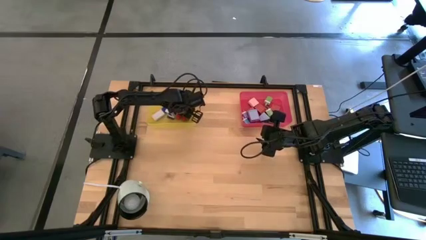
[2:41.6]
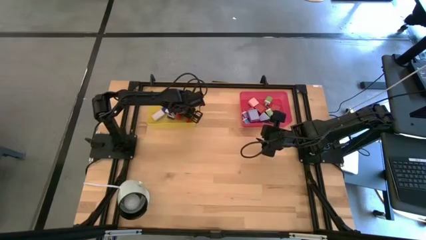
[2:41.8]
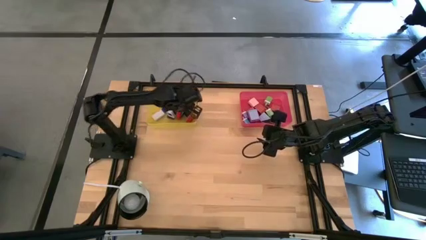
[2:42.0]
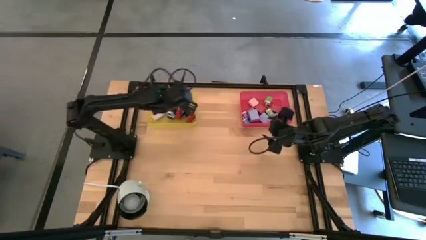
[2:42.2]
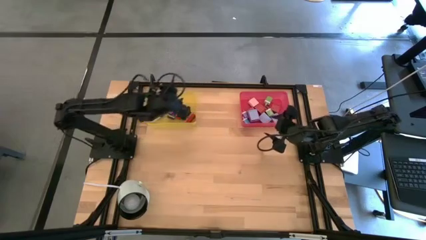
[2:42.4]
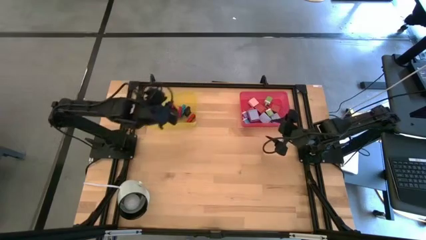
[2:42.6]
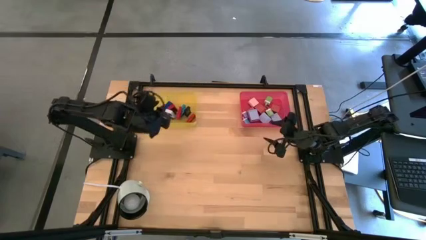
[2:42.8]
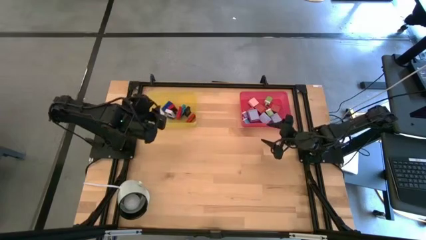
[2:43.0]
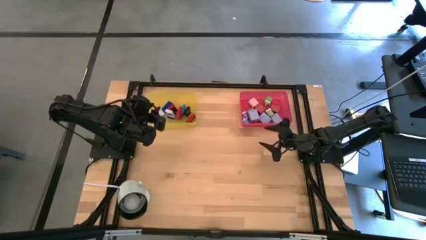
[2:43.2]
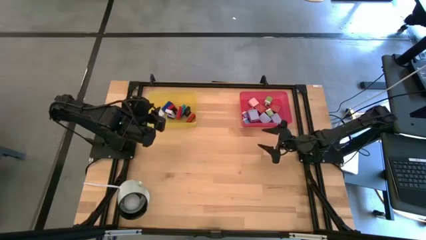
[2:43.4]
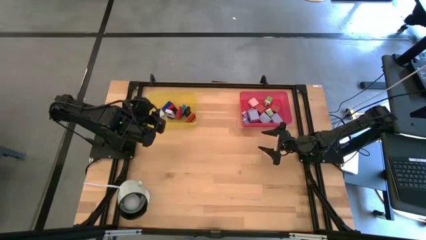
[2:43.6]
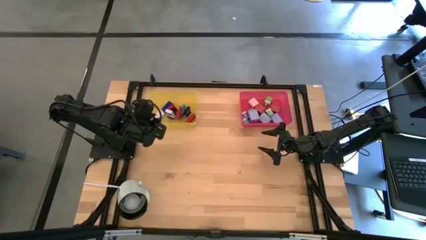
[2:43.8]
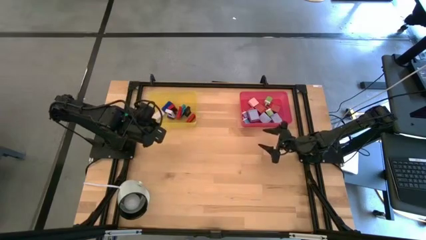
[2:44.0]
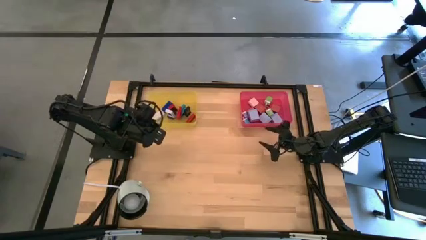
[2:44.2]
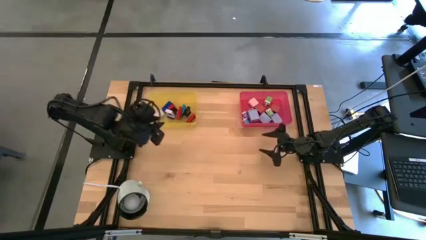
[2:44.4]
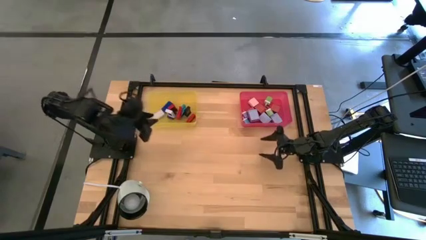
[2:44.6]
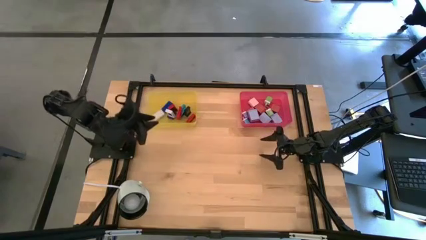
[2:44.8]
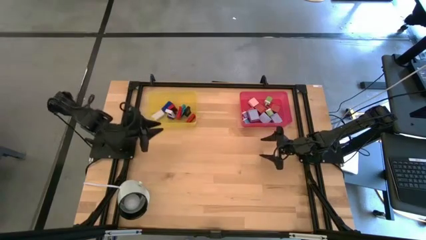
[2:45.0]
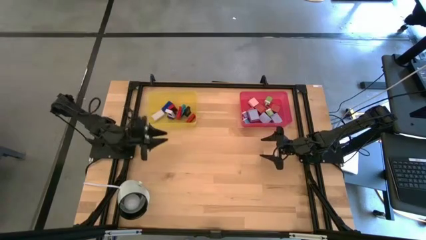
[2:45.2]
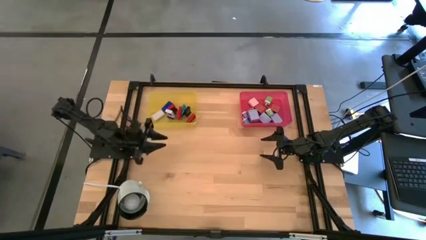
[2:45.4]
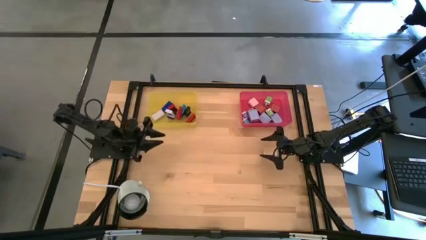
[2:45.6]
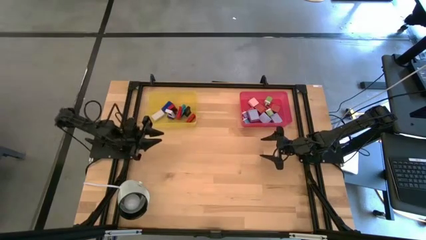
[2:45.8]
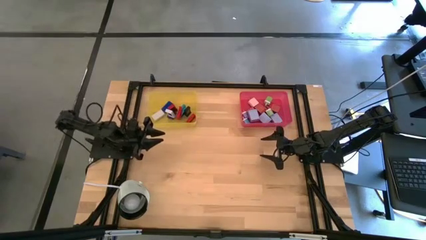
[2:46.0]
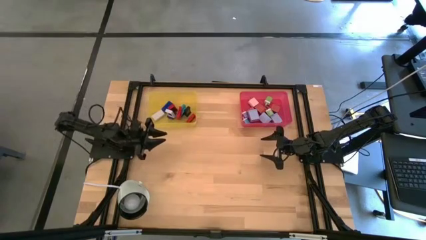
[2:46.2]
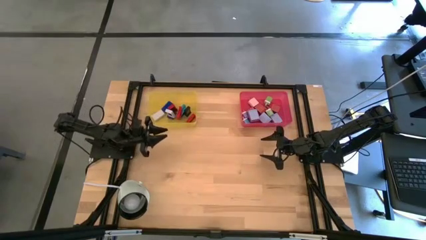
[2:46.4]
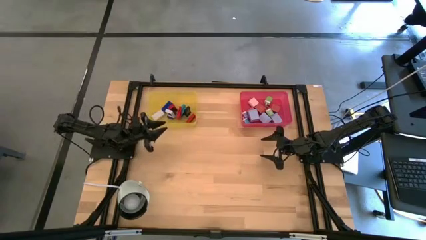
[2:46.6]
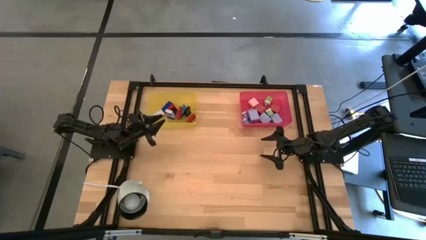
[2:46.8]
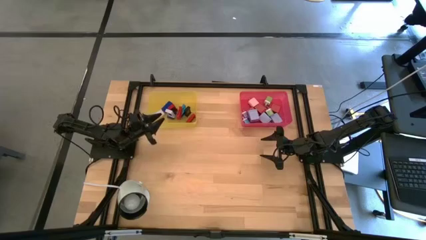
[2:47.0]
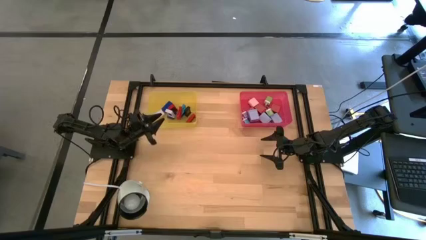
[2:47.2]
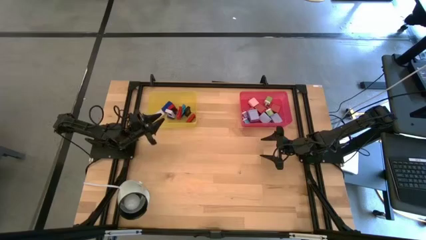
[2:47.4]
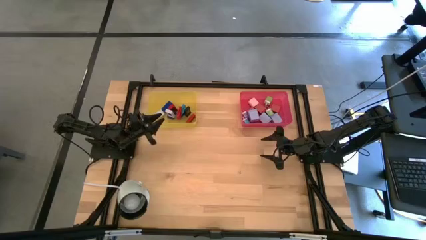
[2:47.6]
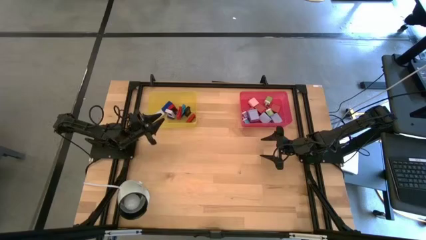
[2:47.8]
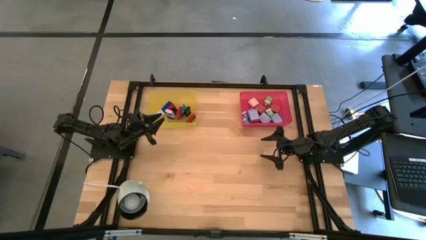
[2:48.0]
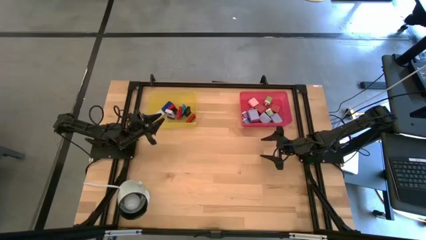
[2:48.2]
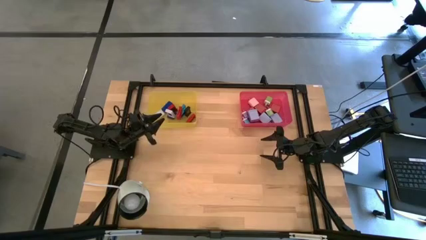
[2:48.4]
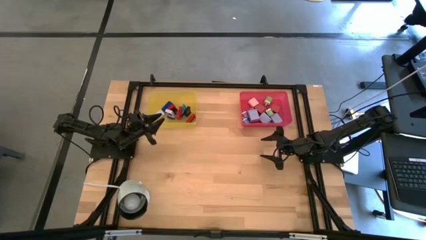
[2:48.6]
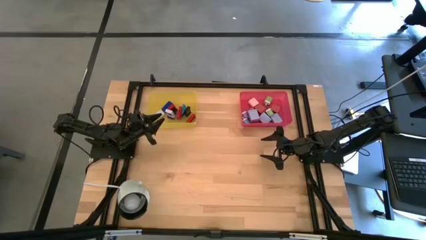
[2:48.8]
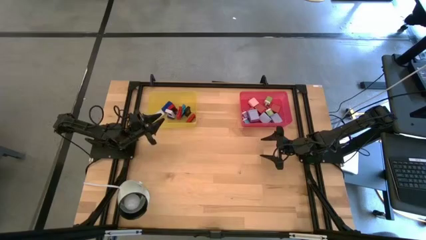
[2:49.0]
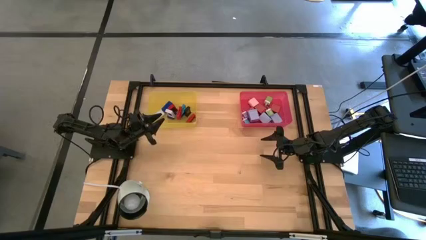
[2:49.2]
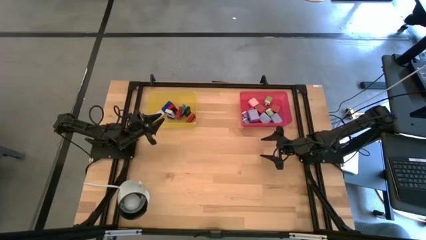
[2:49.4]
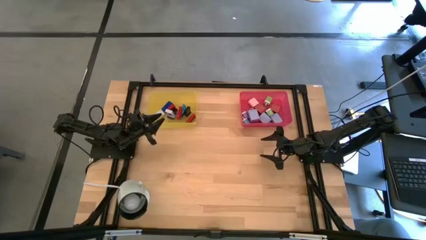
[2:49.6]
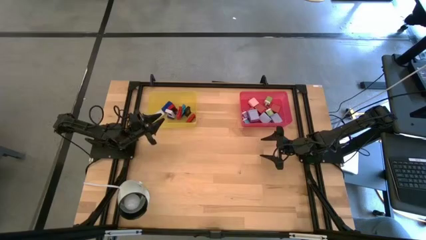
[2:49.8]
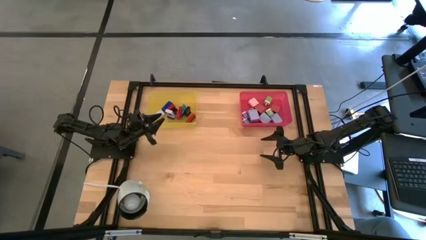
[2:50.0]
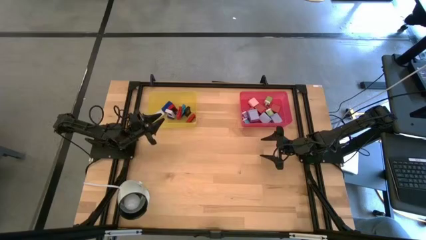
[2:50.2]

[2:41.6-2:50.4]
Task: Pick & Place Office items
Return to Home Position
